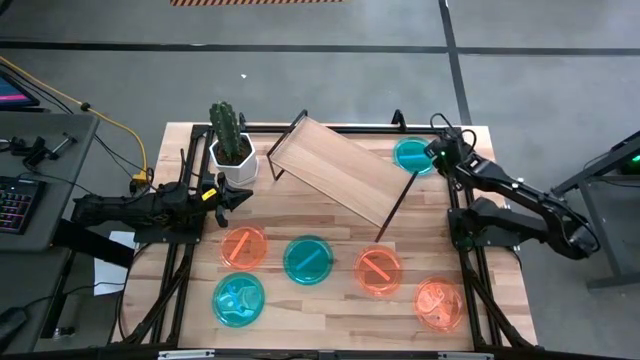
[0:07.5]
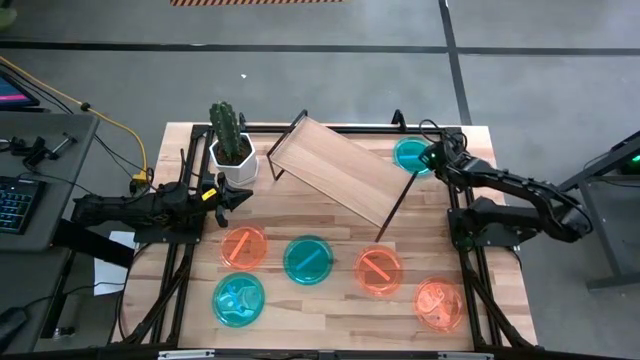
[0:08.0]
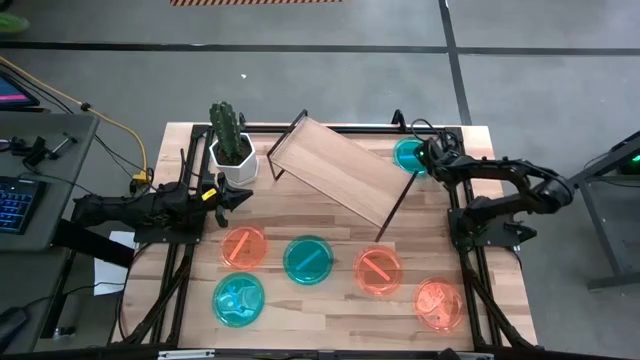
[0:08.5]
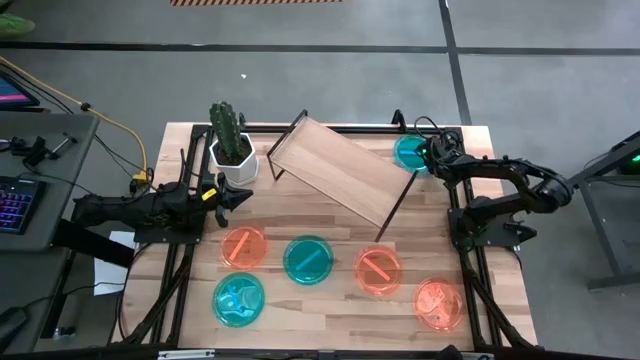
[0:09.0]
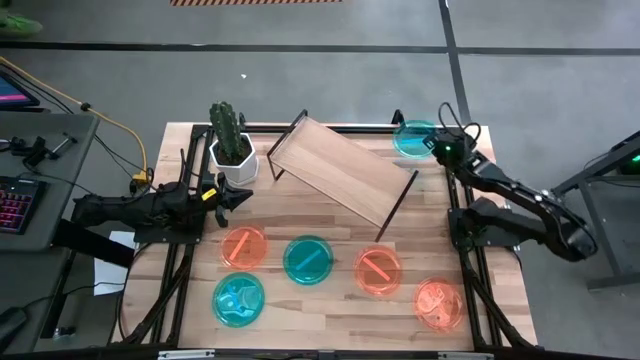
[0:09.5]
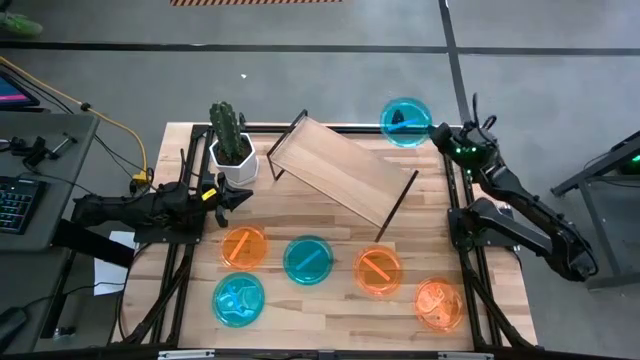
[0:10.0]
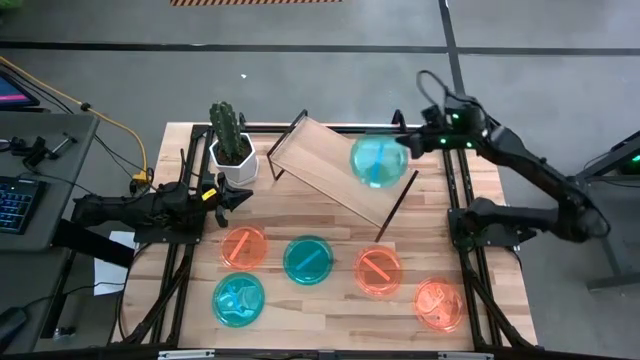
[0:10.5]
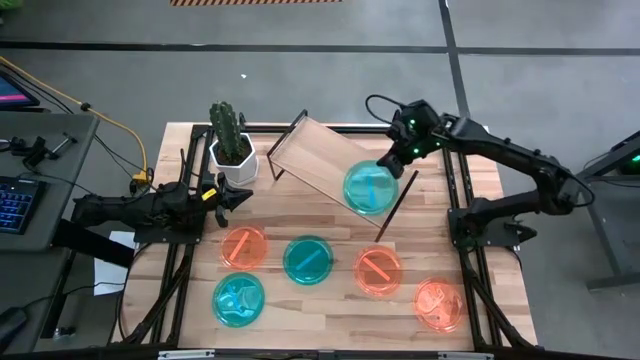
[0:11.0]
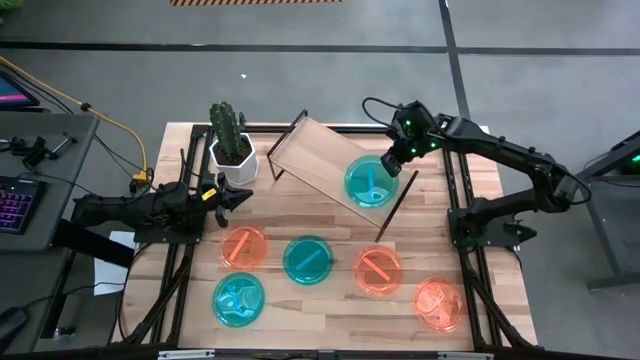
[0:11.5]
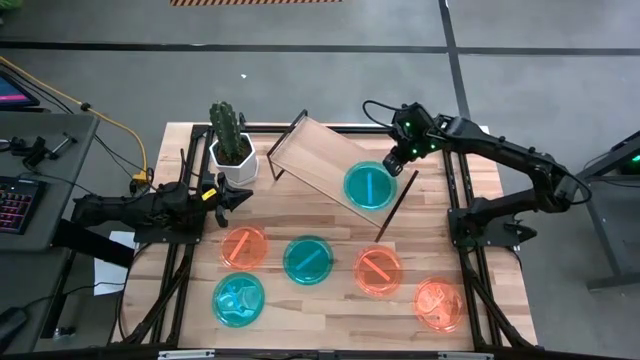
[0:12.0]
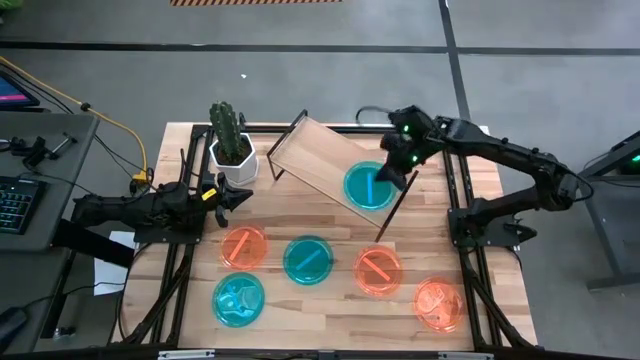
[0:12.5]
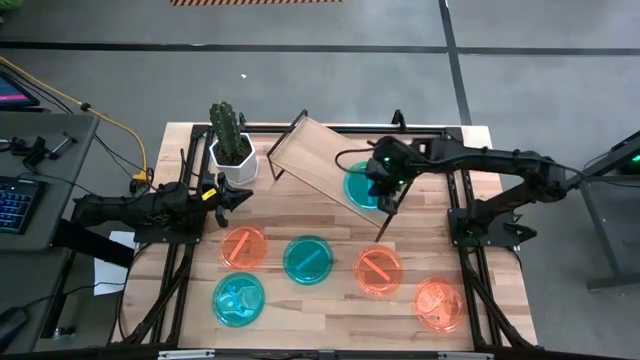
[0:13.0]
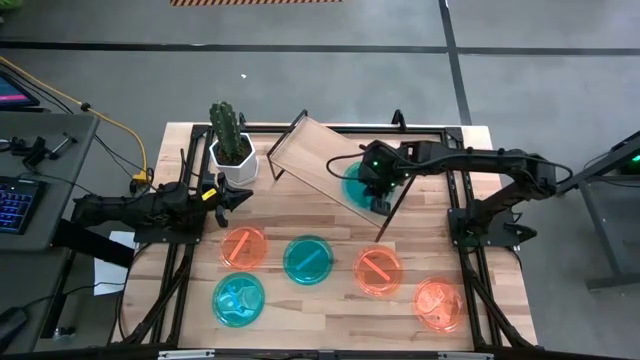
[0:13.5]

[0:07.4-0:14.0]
Task: Place and stack plates onto a shelf
Put the top right blue plate on the shelf

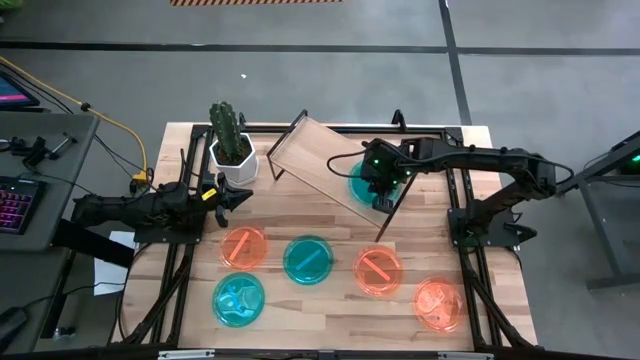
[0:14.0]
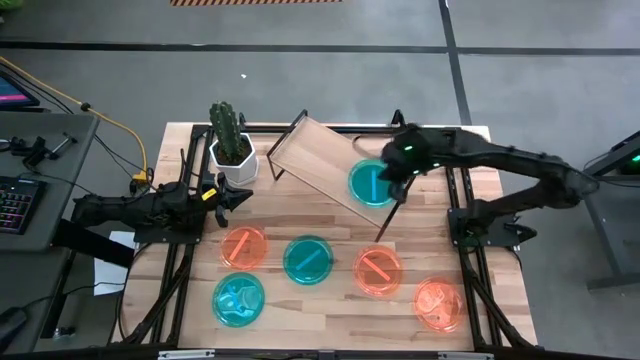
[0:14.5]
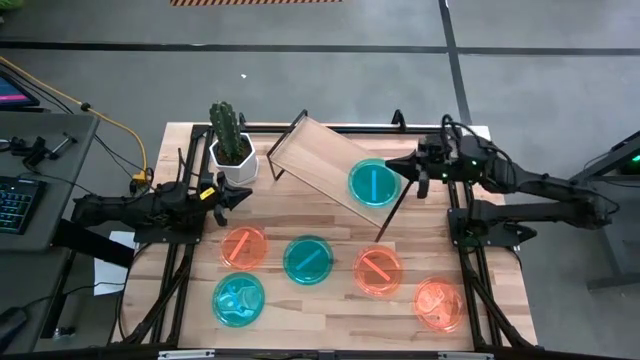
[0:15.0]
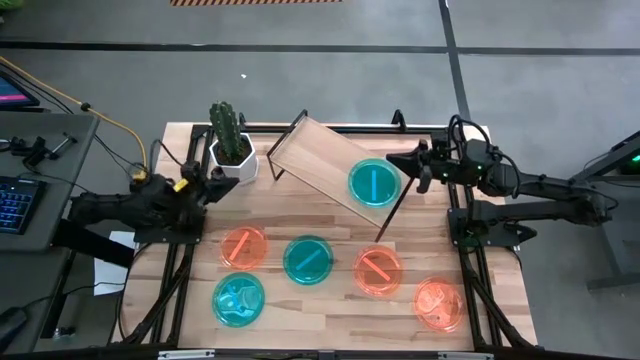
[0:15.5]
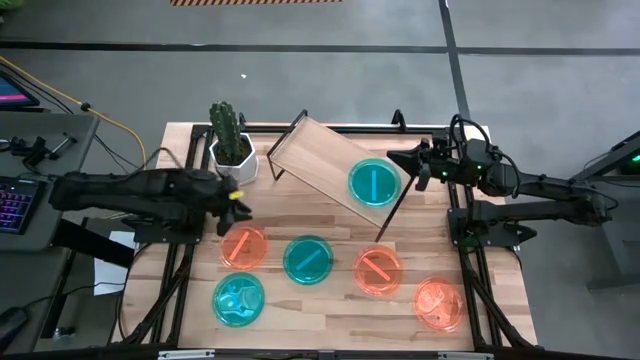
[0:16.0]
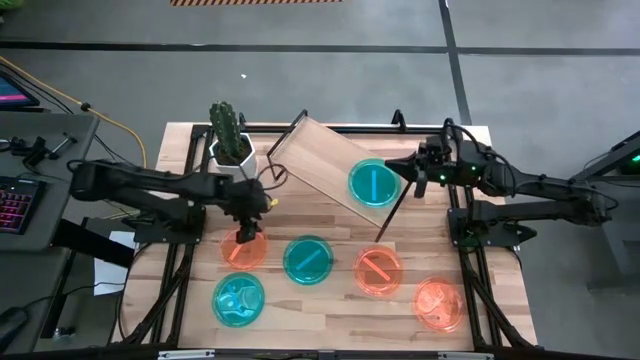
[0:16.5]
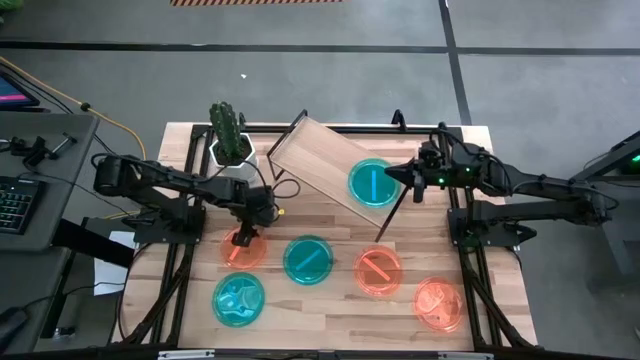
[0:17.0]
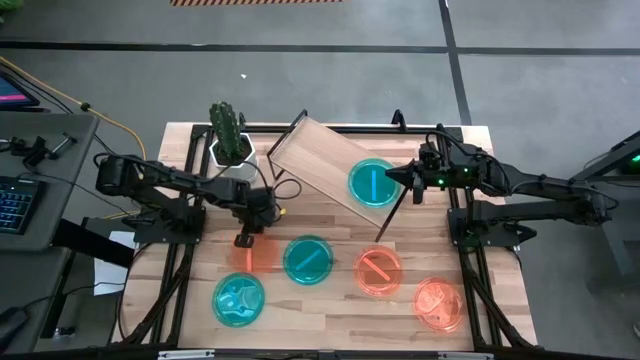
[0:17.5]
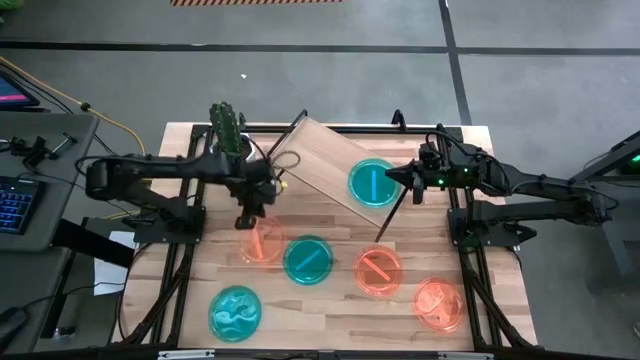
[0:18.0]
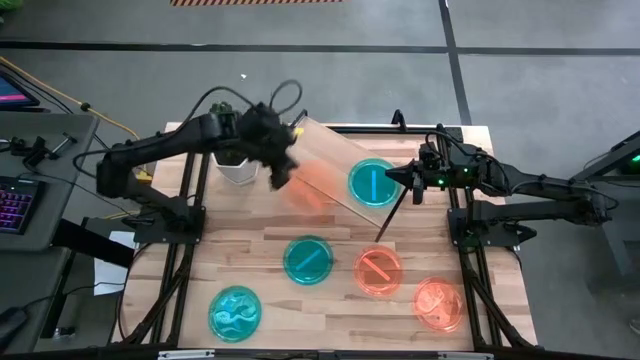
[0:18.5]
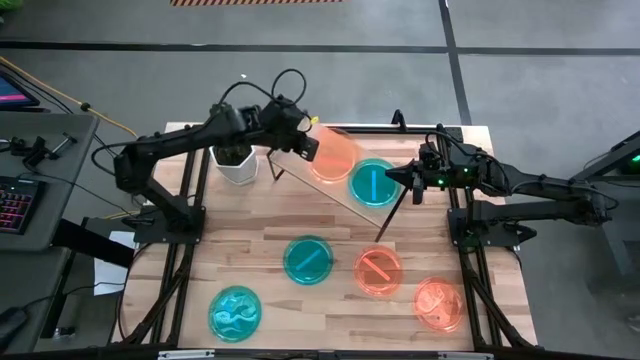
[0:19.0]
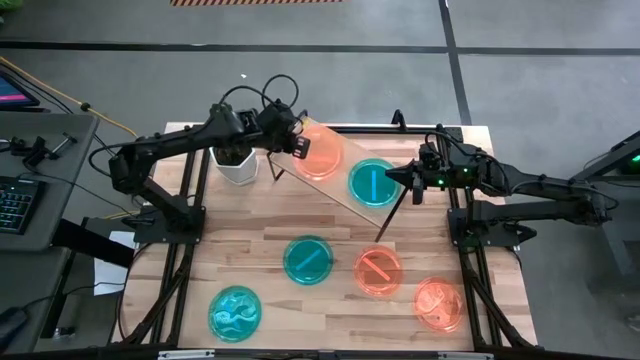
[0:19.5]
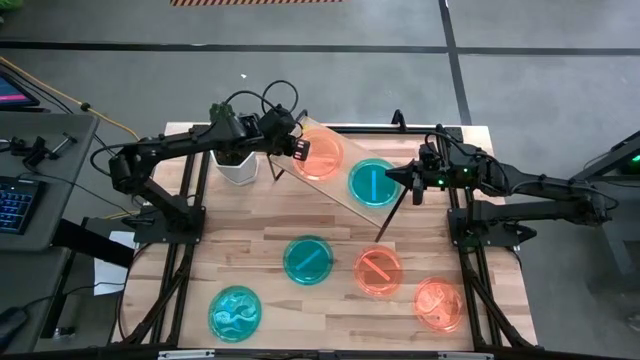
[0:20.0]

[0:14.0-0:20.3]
Put the left orange plate on the shelf

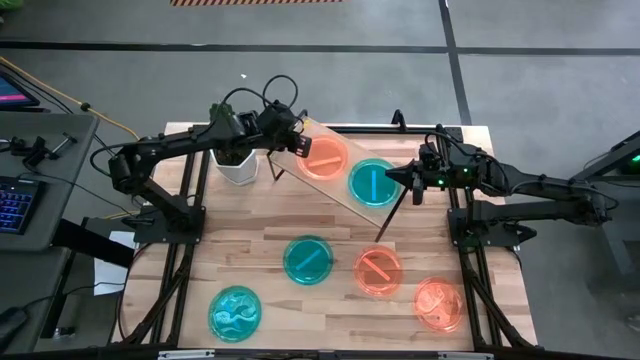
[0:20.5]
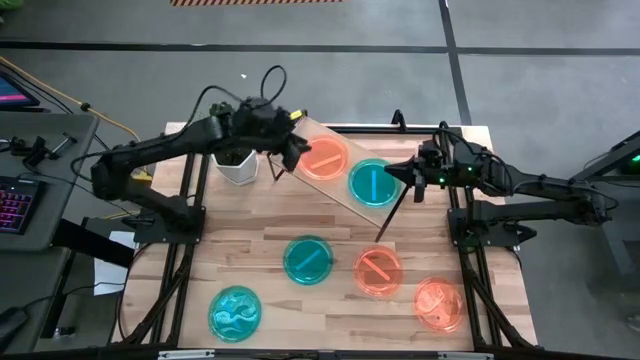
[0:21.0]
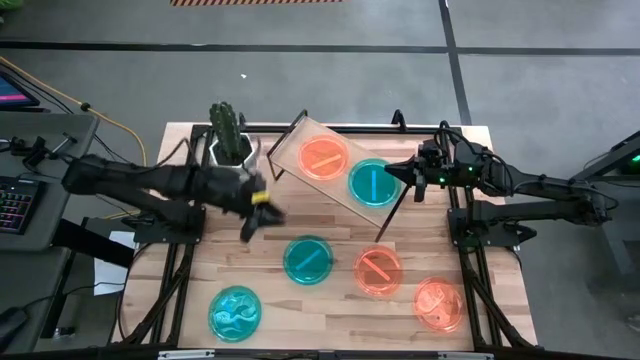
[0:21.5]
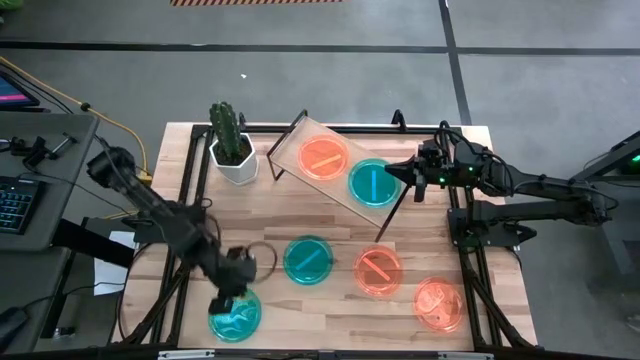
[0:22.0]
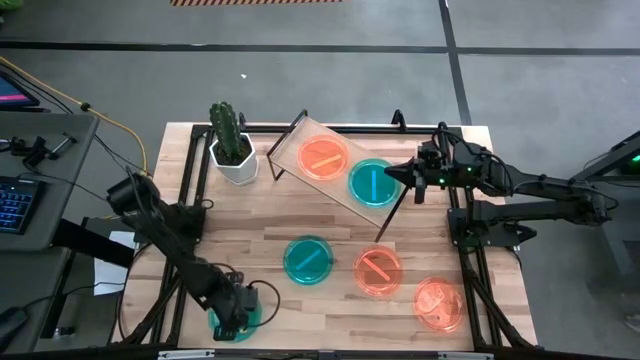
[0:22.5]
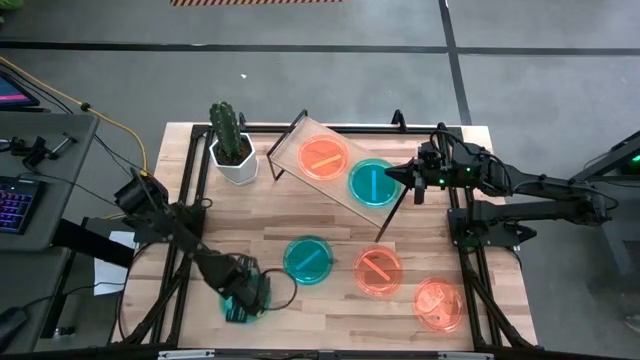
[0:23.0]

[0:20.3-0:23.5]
Move the bottom blue plate to the left side of the top blue plate

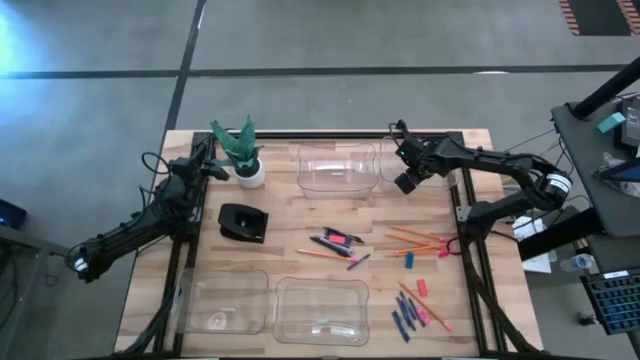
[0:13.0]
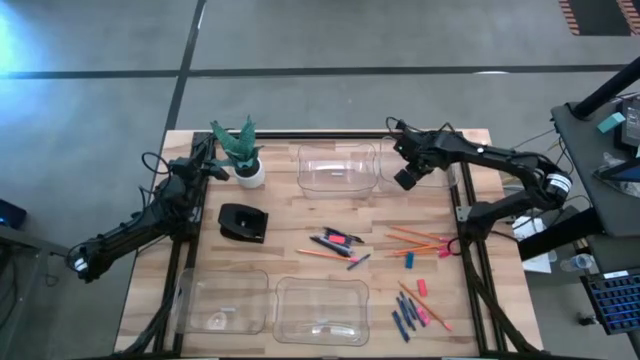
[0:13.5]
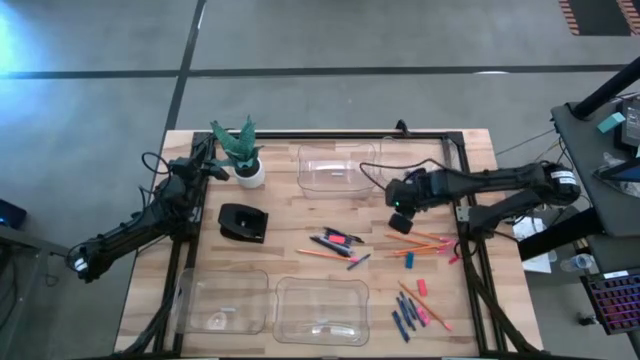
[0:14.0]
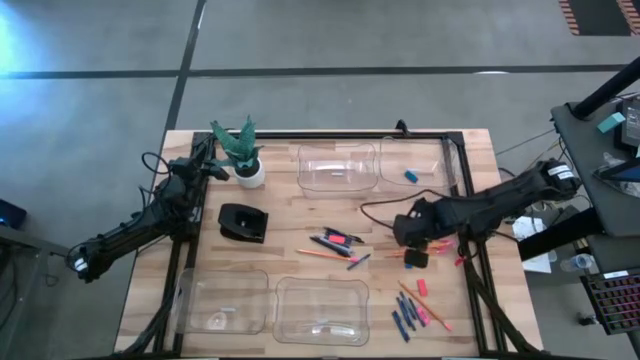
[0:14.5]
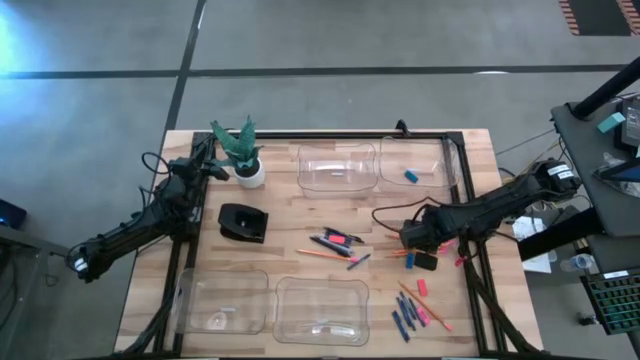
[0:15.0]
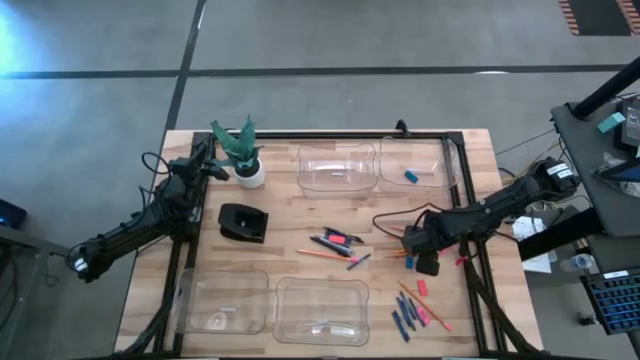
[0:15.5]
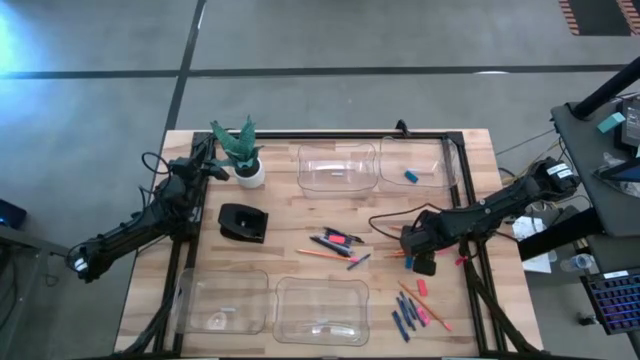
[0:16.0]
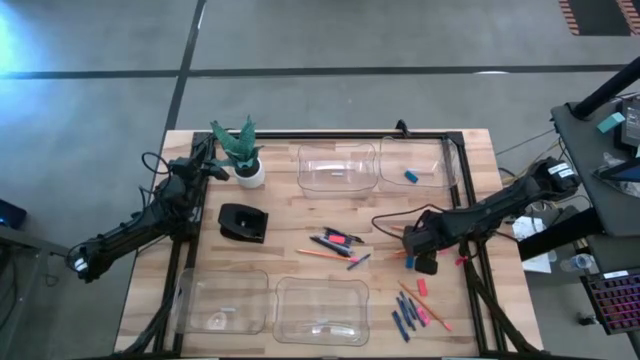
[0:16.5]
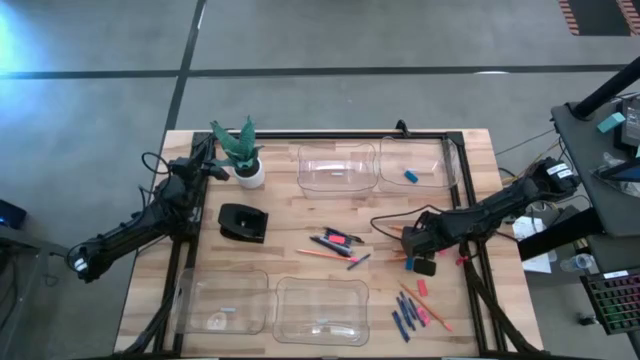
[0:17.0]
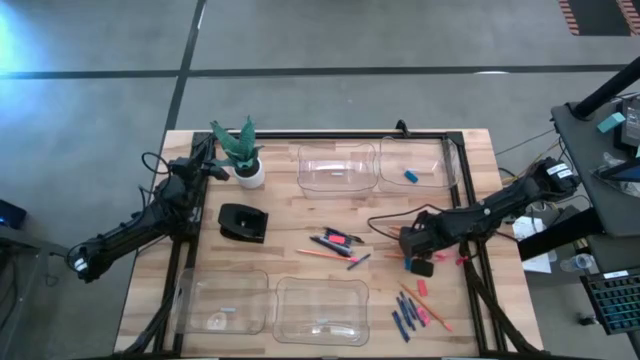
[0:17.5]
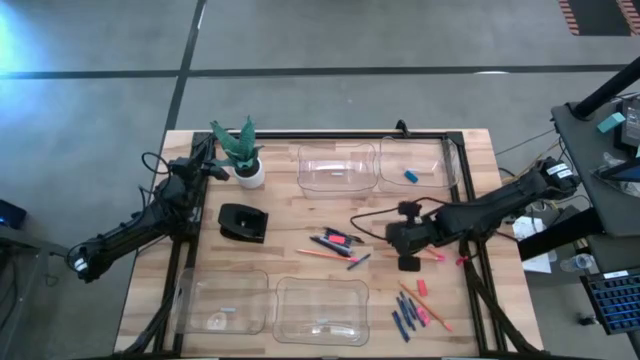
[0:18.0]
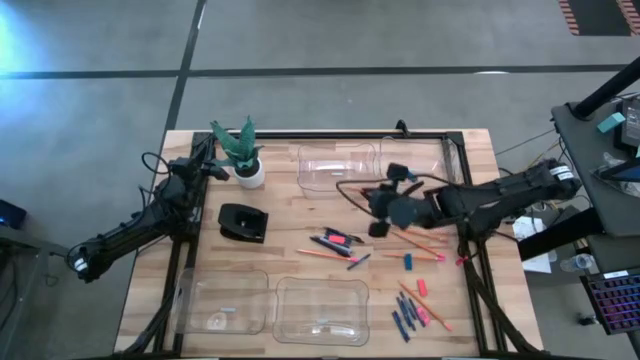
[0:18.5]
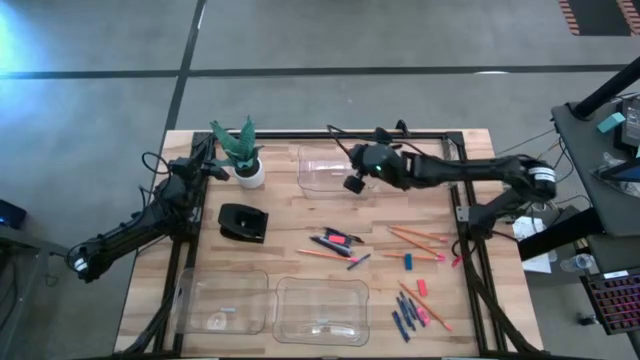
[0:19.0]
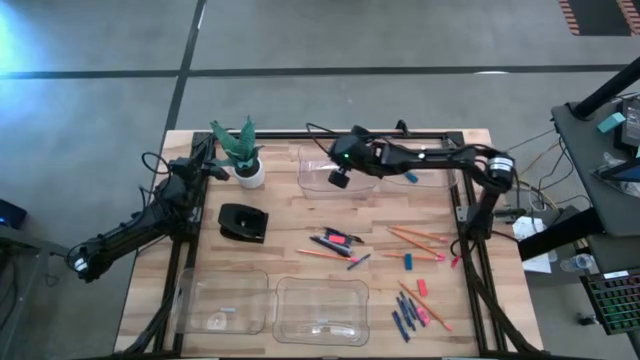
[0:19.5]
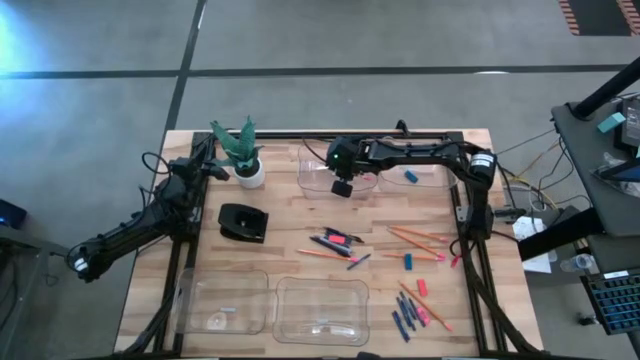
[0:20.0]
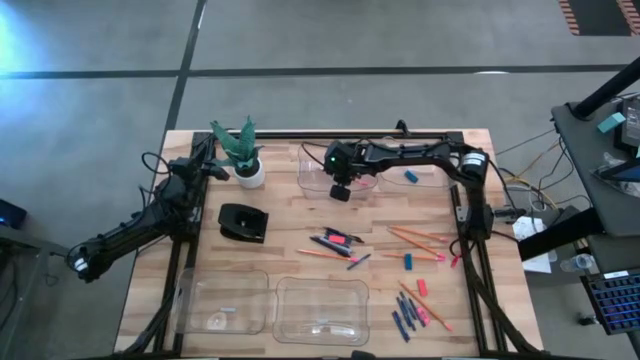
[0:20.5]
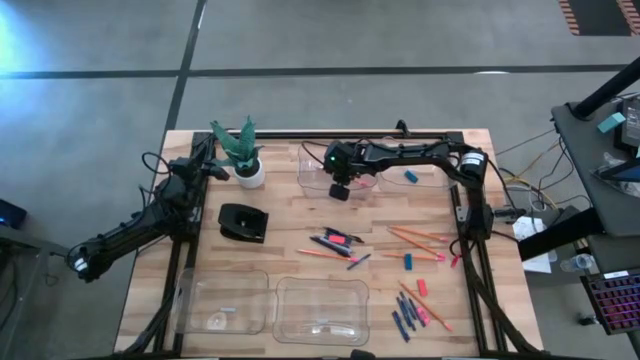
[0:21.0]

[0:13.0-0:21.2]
Task: Sort crayons/erasers/pens/pencils in bins
Put the yellow pencil into the top left transparent bin
